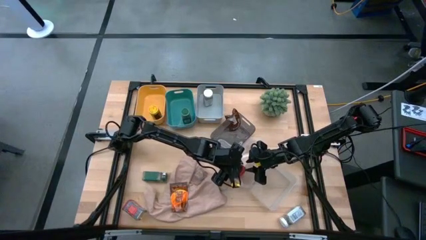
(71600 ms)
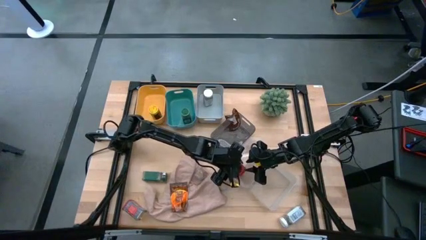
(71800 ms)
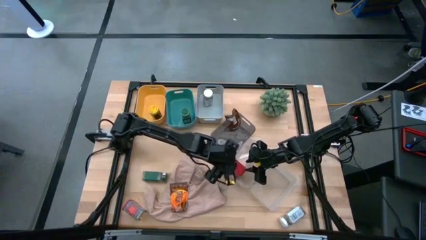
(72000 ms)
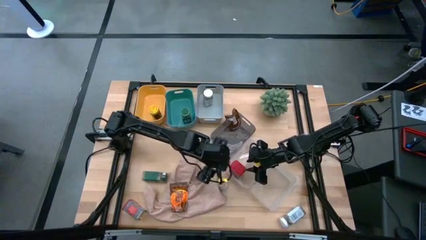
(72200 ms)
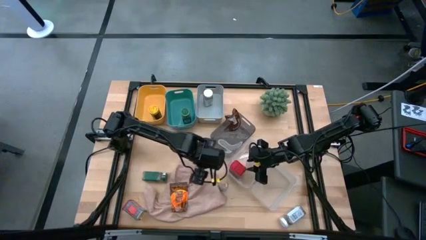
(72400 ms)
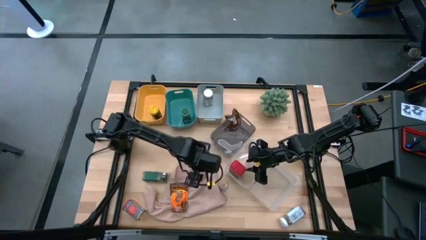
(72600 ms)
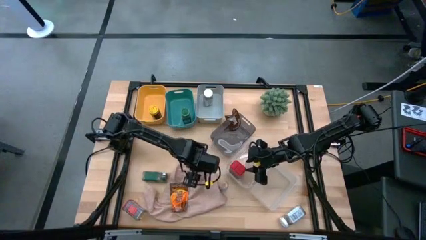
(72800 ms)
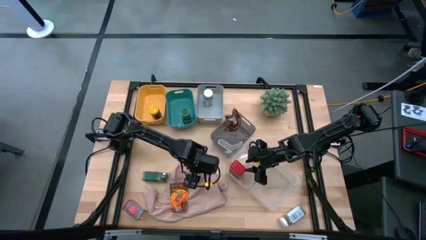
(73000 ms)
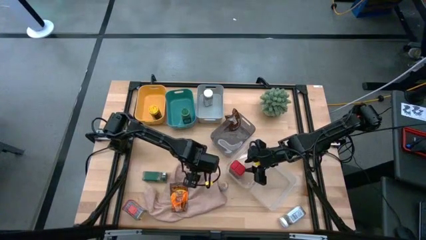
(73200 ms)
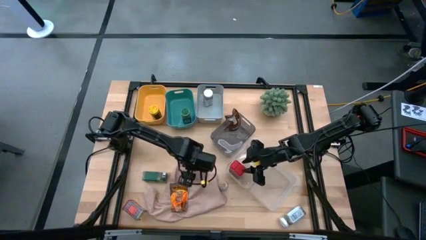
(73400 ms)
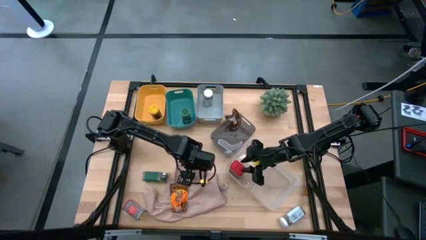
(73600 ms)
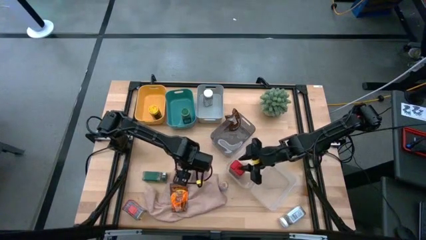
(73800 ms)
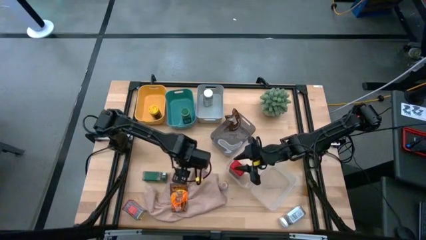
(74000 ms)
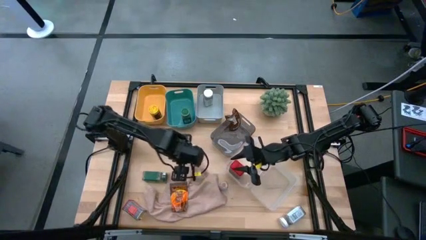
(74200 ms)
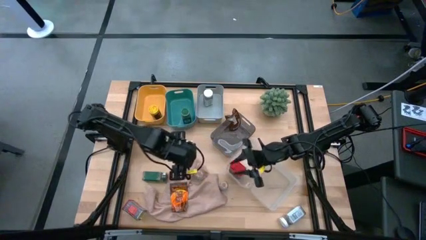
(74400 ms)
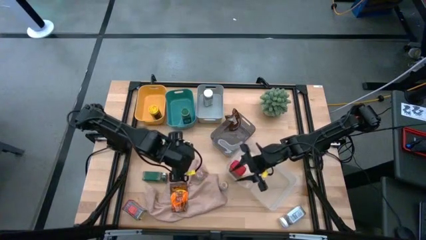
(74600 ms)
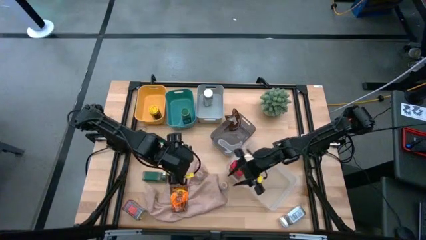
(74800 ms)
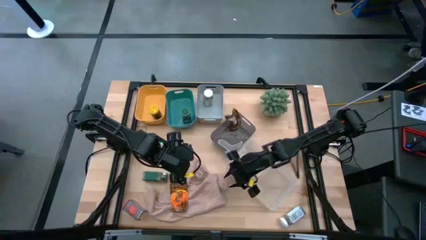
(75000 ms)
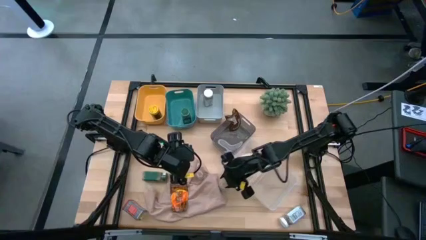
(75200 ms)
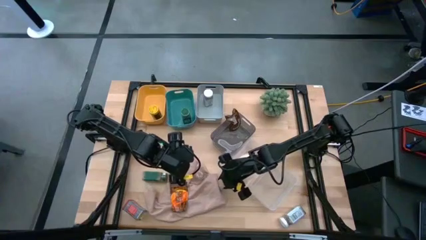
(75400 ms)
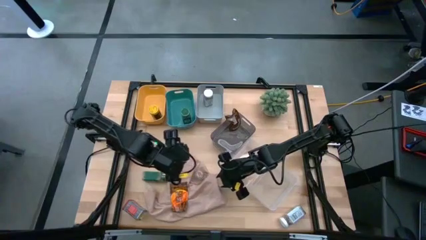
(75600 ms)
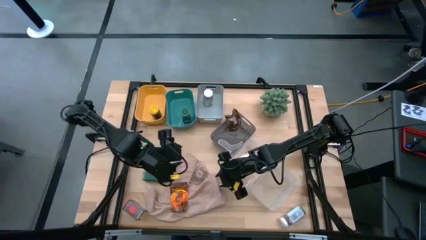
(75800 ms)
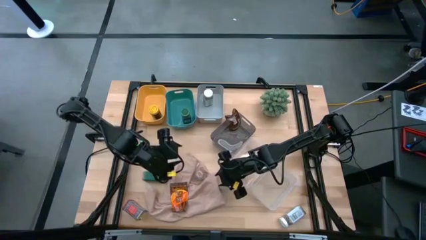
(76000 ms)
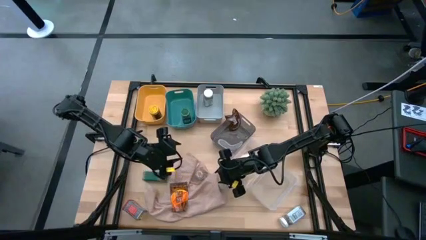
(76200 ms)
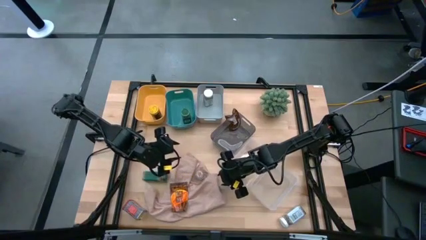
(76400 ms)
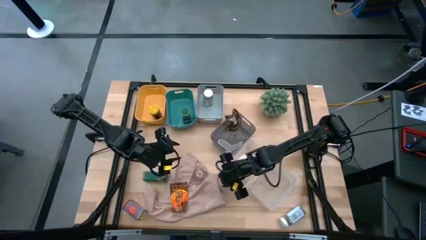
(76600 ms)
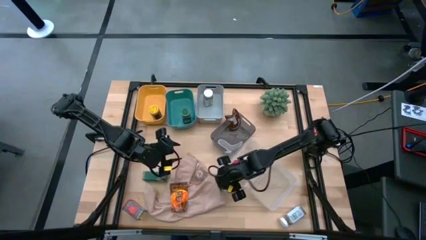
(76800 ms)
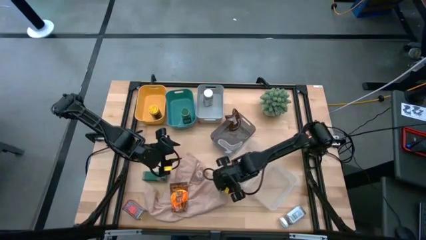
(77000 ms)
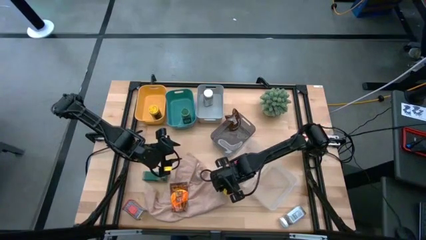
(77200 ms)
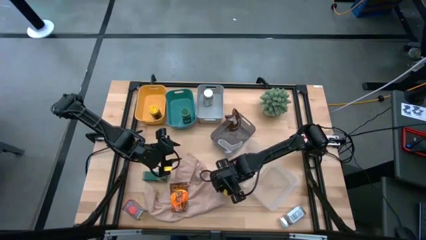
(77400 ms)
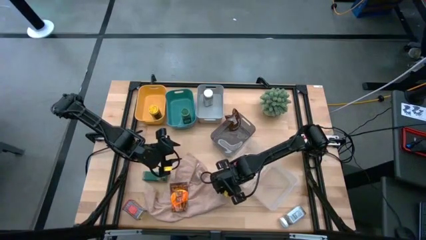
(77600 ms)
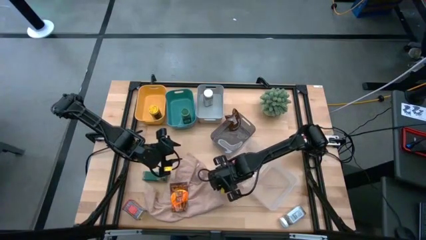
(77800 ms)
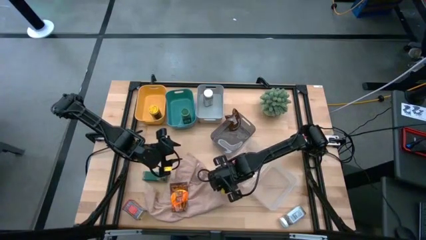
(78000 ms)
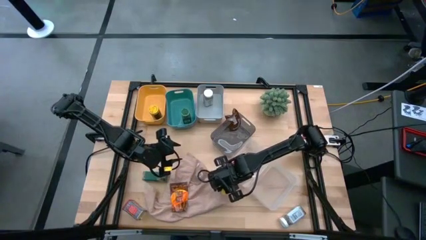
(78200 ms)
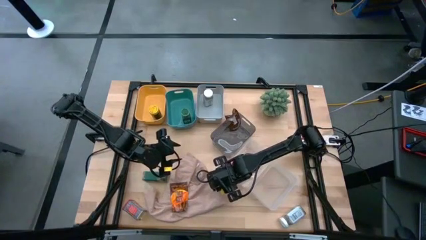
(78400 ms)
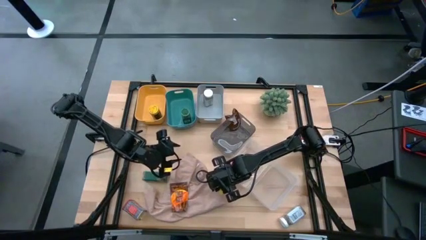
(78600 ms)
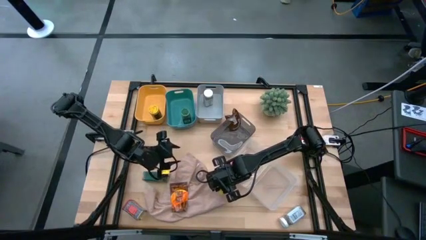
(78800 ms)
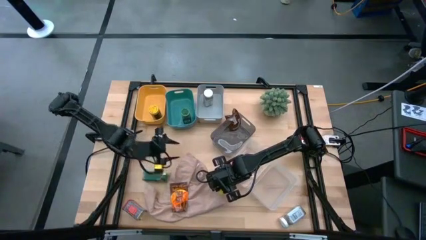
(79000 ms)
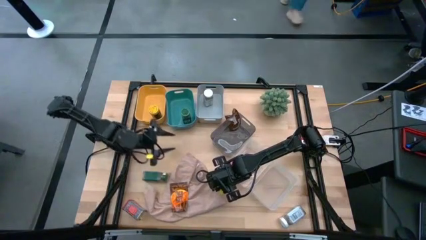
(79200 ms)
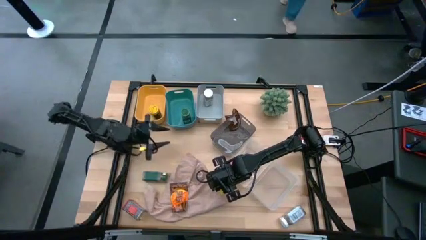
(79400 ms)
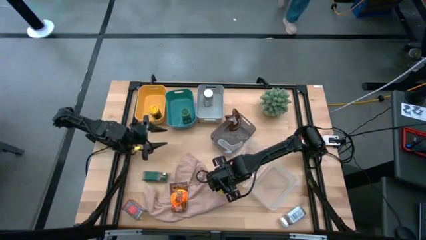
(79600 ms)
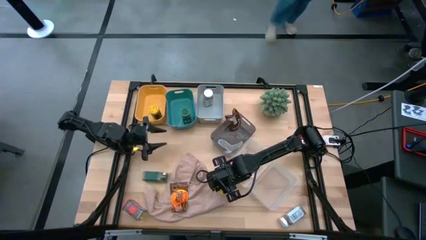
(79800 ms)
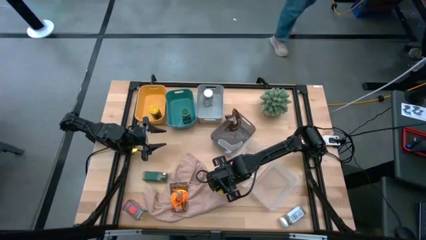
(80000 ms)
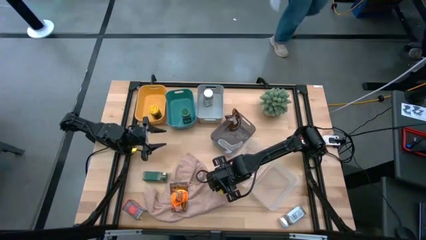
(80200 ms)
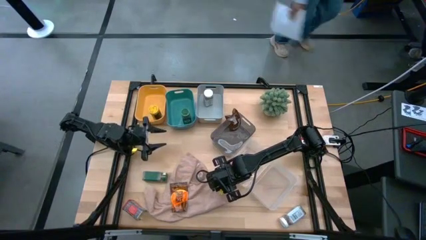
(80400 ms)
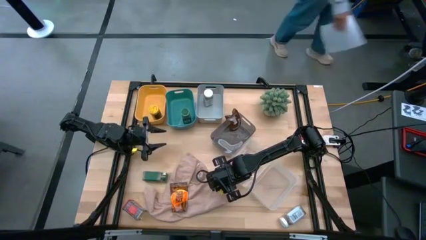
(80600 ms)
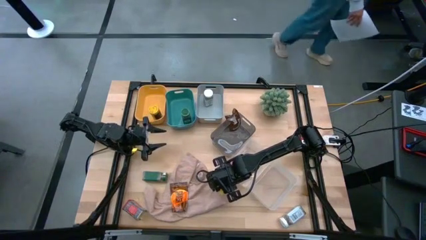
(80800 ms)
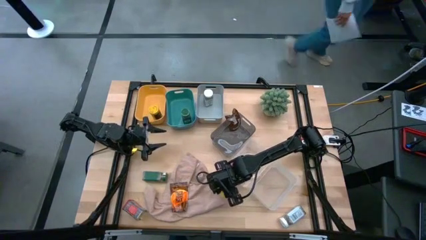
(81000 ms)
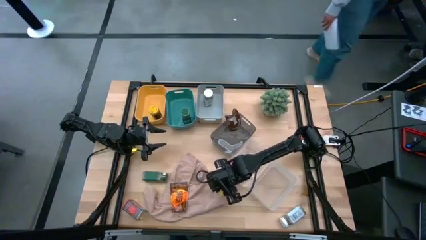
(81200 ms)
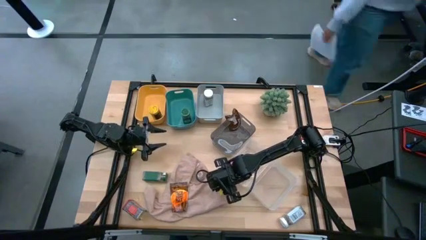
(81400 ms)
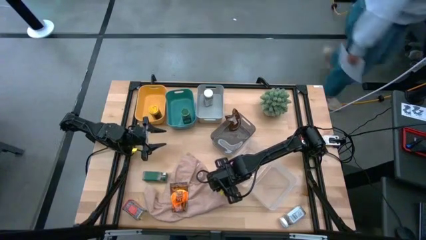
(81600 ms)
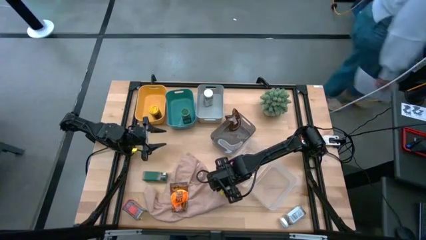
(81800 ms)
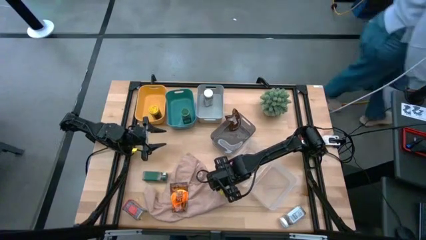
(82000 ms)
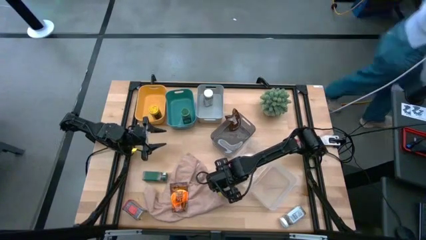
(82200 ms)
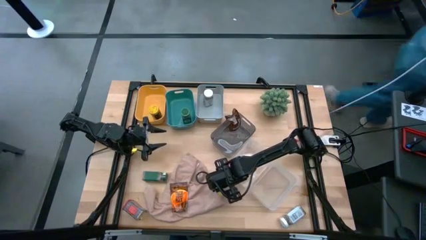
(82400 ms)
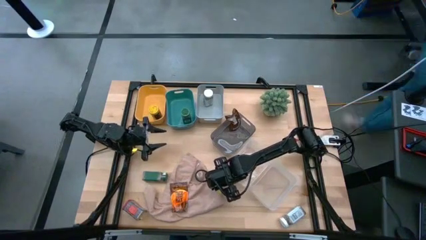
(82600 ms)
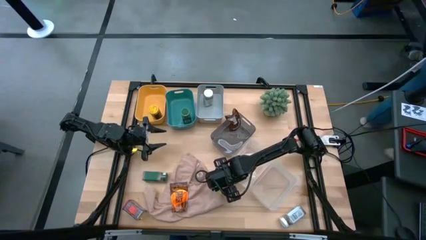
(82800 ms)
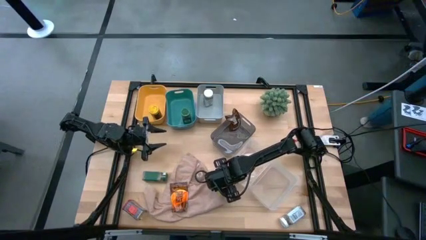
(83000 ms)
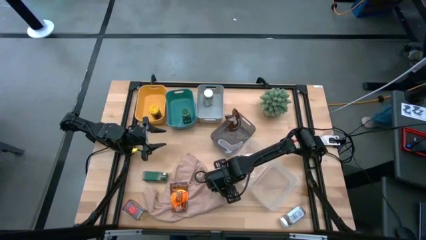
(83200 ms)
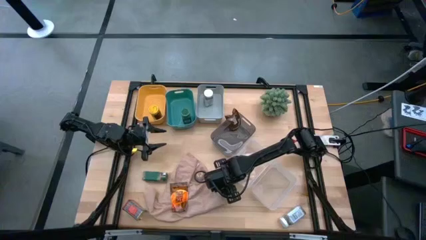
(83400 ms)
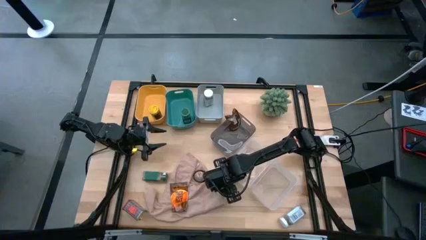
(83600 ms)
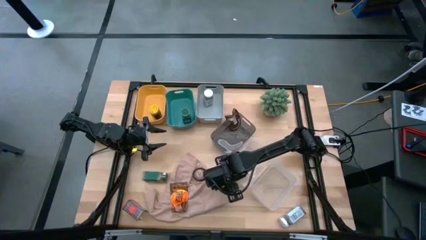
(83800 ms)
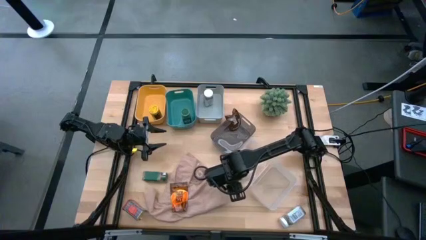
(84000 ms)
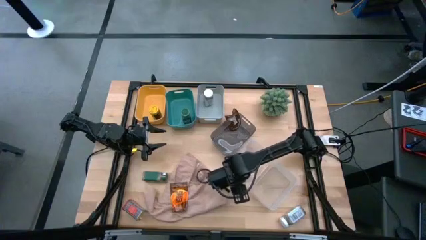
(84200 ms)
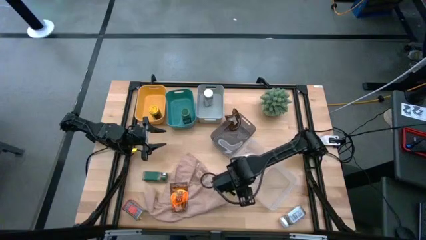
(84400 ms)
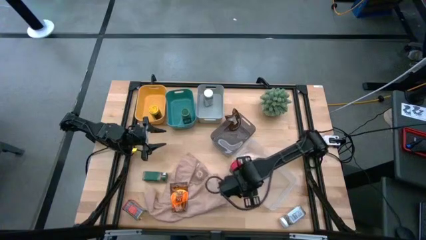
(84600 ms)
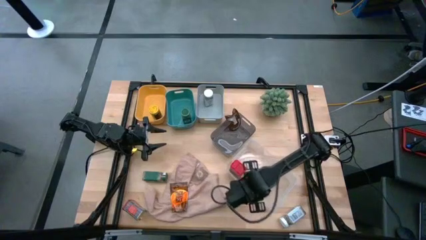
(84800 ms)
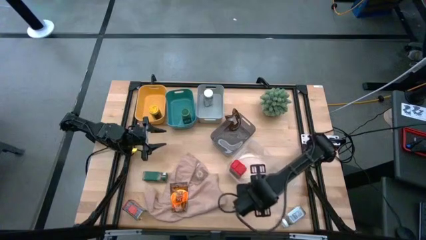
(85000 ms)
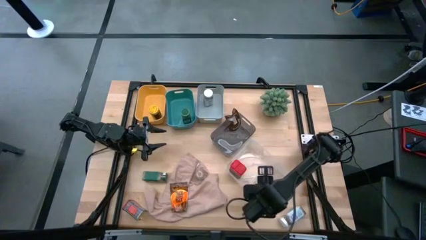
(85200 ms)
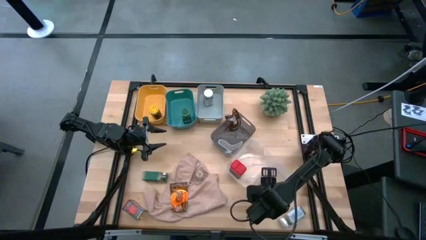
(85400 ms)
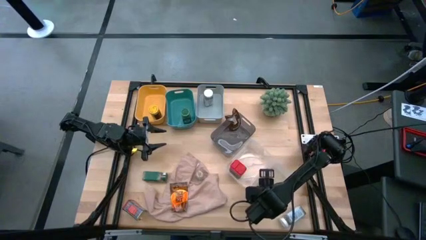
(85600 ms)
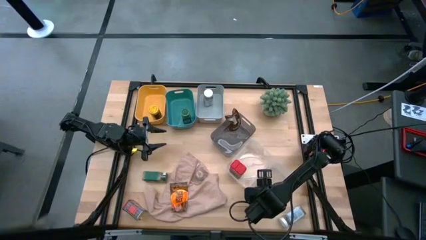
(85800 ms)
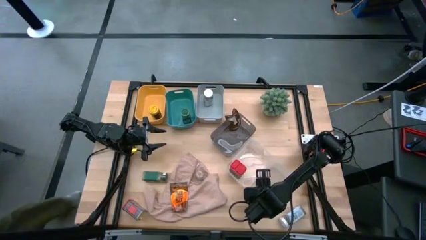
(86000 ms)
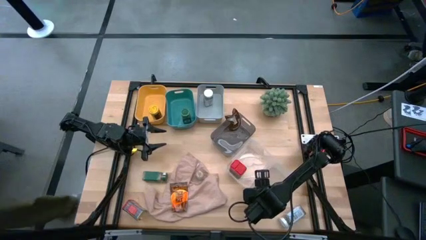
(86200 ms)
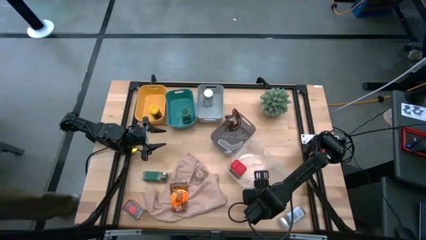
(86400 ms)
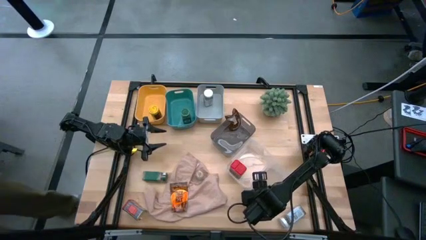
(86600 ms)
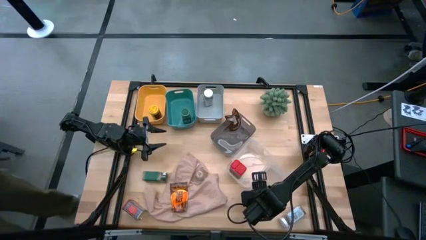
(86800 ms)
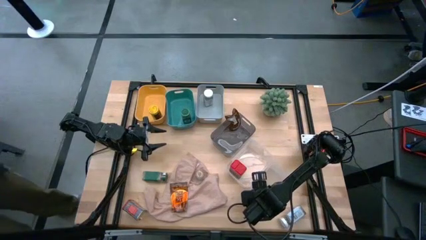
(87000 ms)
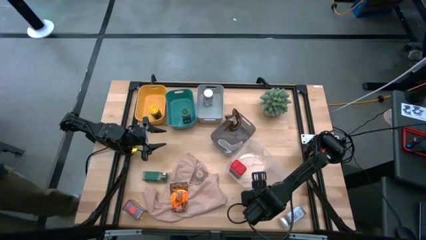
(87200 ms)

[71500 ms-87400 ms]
Task: Sort spices by type
Put the right brown seasoning bottle into the right transparent bin
